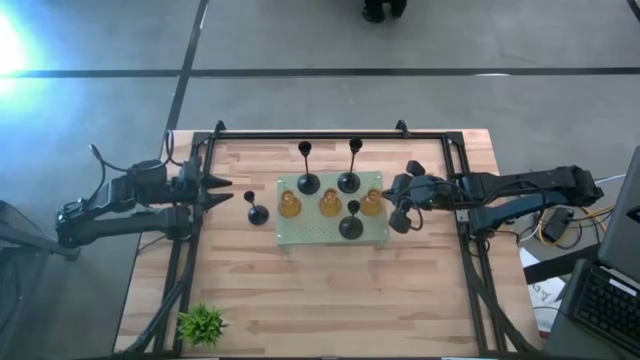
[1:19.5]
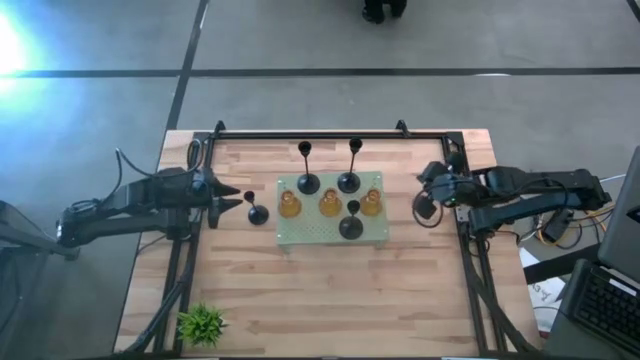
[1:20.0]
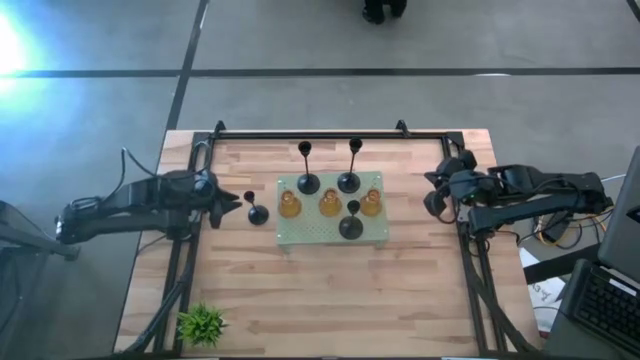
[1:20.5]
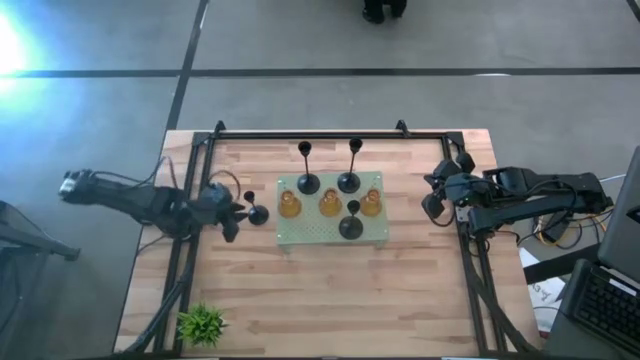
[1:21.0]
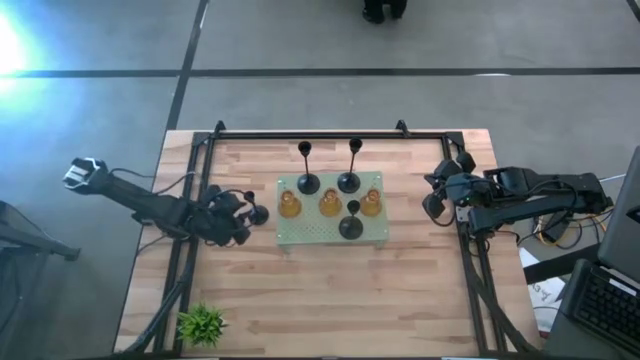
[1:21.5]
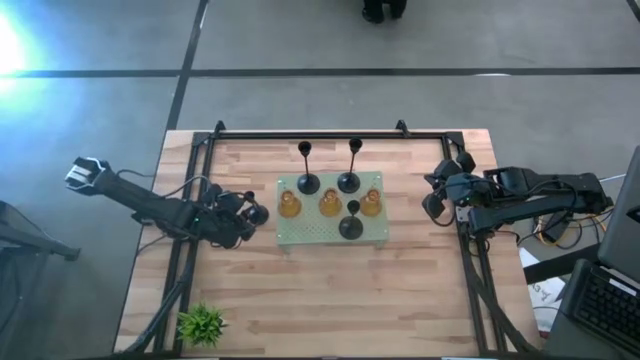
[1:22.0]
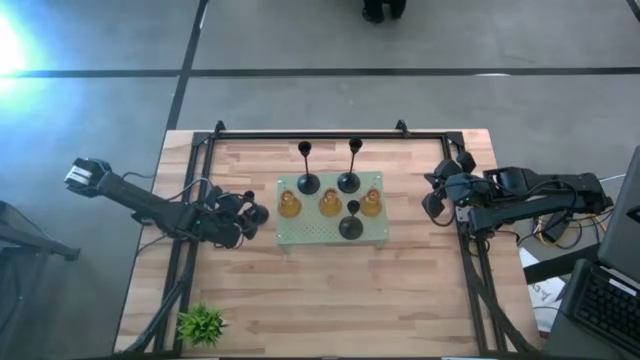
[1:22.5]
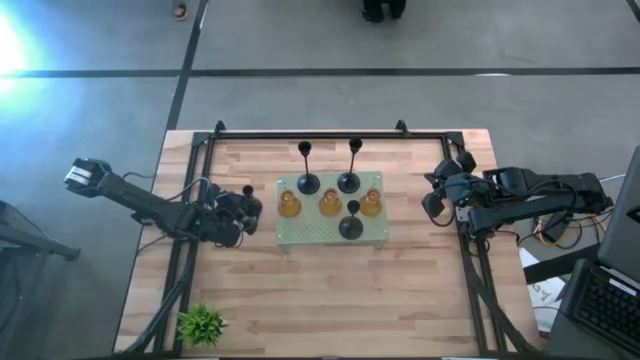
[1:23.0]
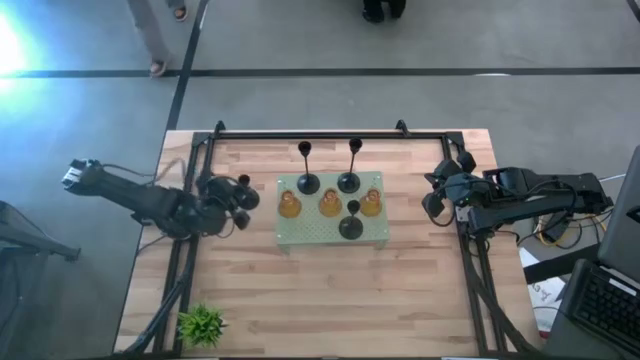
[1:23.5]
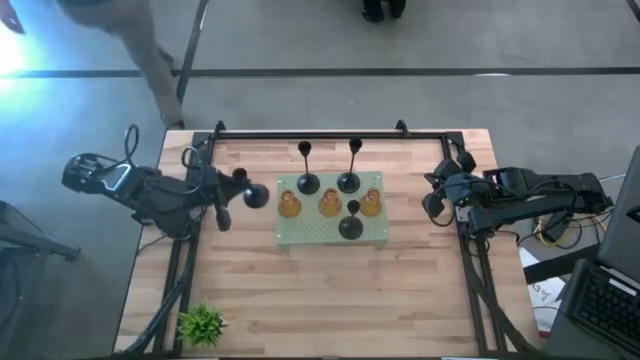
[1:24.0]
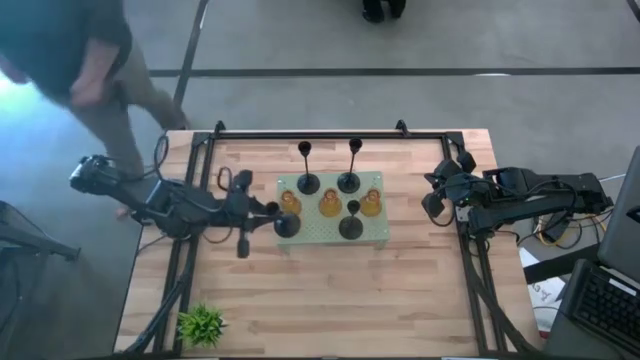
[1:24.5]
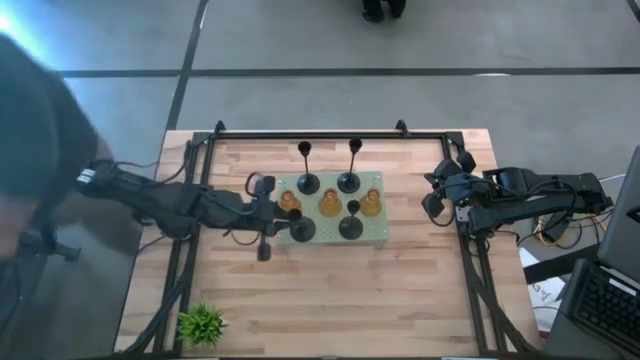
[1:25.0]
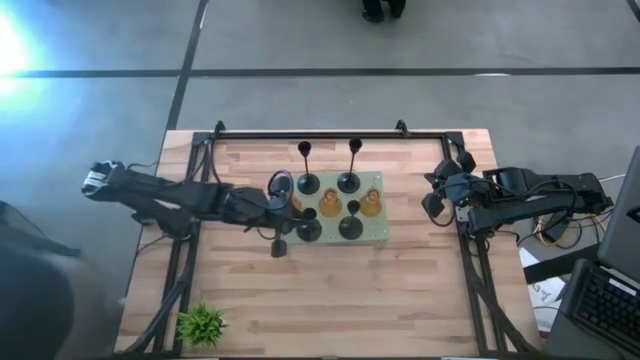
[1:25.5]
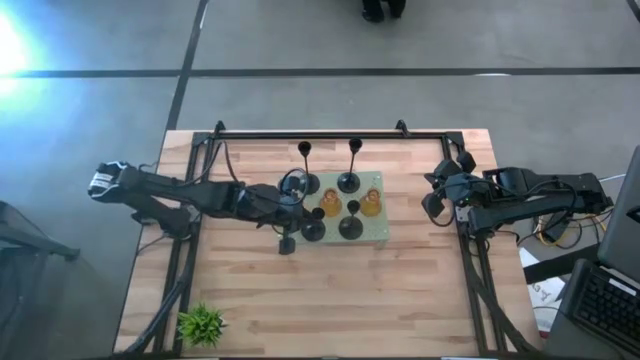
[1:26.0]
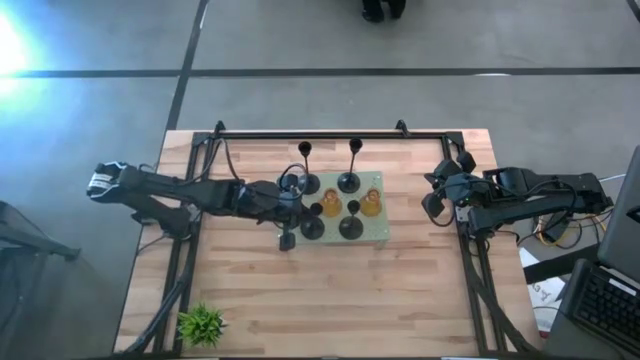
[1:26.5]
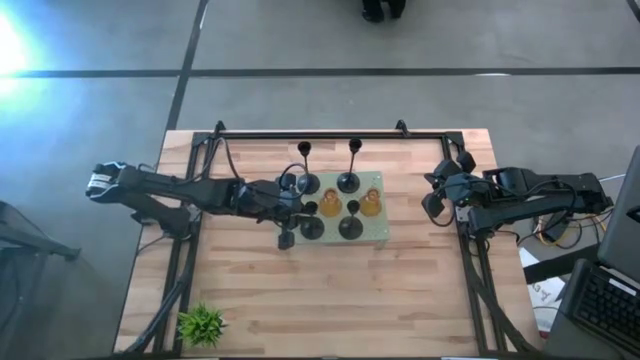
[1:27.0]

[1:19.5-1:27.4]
Task: Pick & Place candle stick holders
Put the black candle holder on the shelf

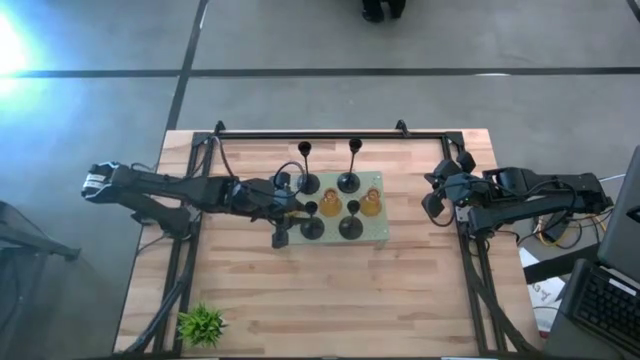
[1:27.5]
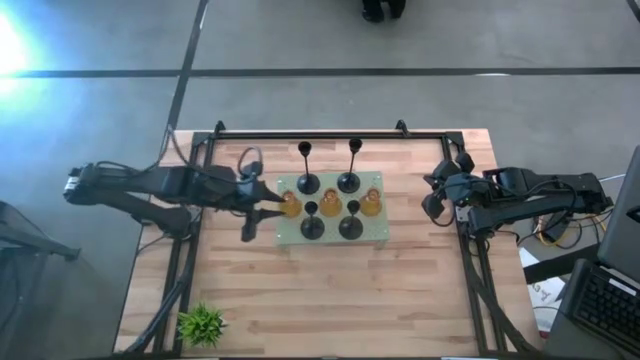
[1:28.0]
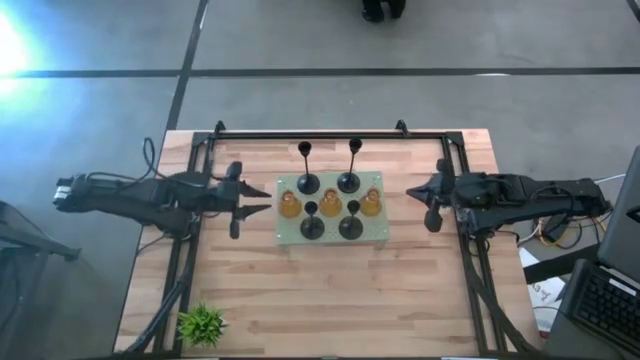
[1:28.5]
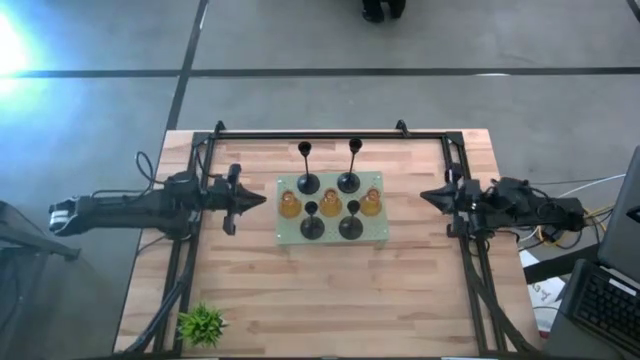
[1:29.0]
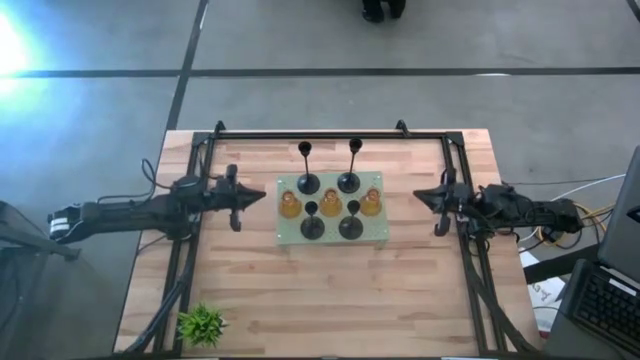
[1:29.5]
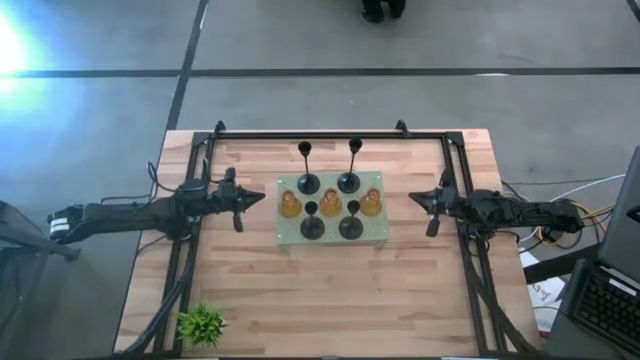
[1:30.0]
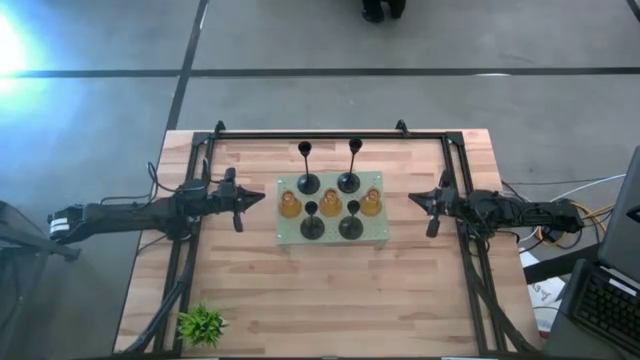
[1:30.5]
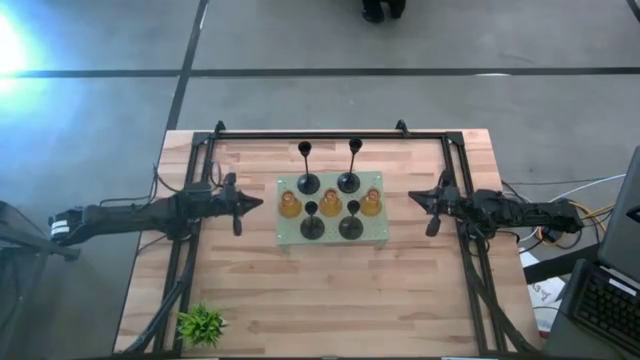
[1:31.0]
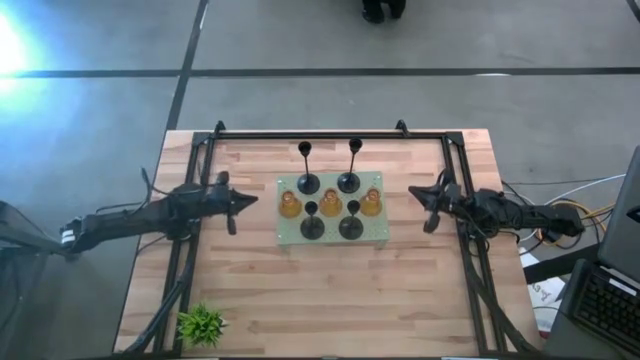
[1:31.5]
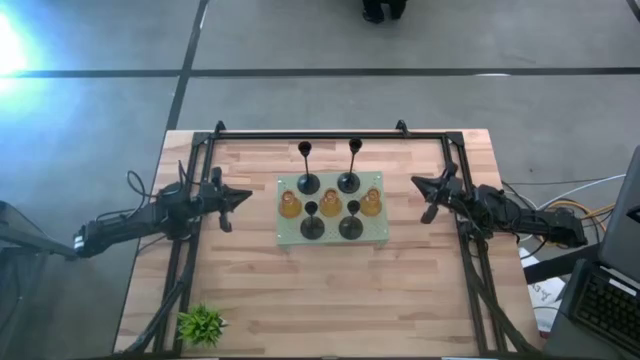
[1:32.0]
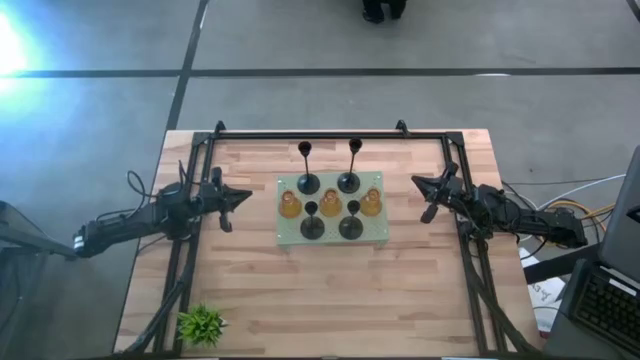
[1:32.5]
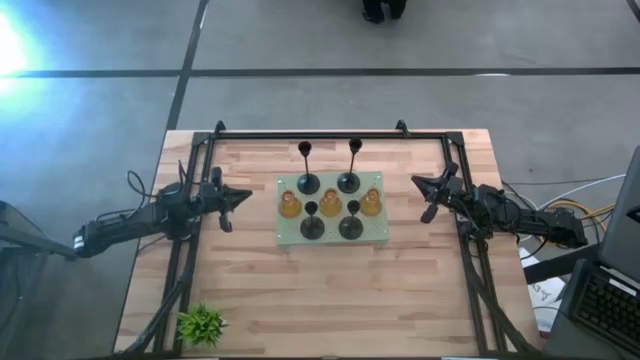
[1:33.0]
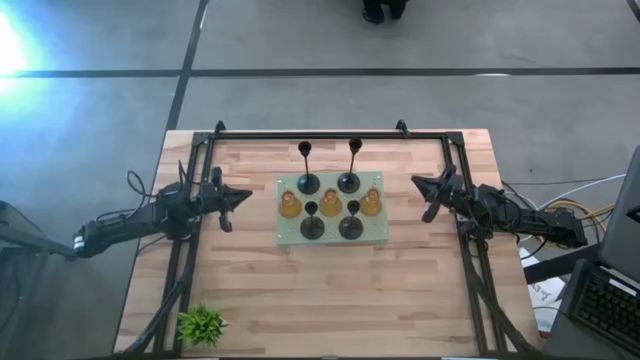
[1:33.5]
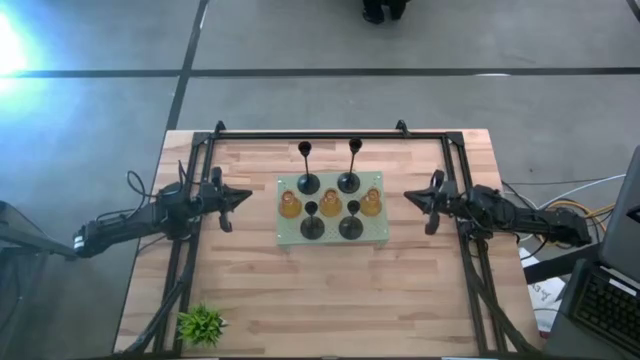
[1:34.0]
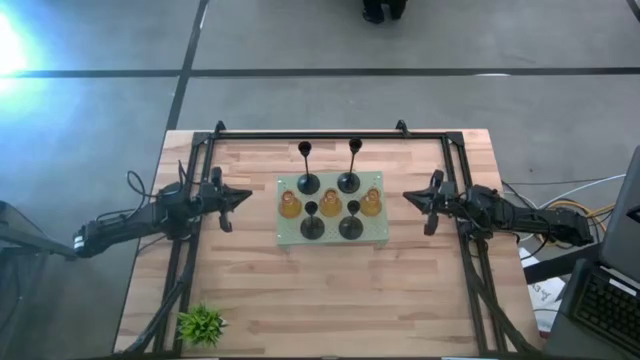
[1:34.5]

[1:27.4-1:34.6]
Return to Home Position

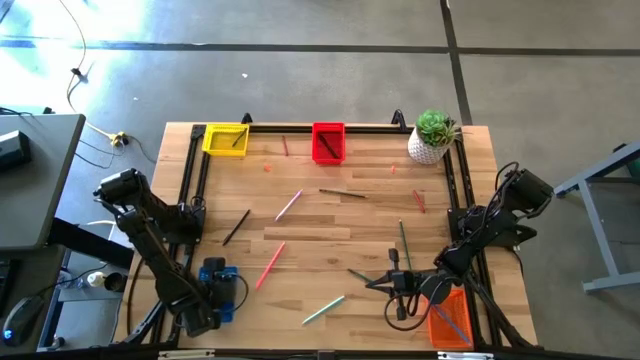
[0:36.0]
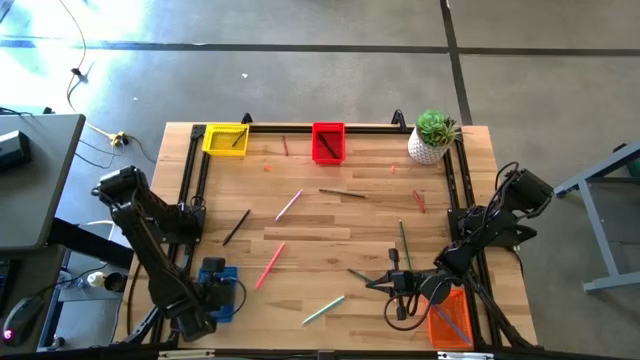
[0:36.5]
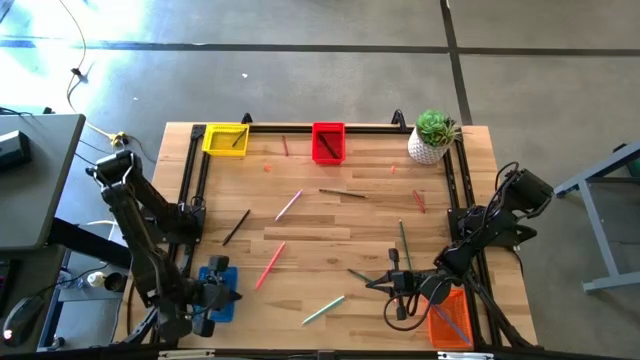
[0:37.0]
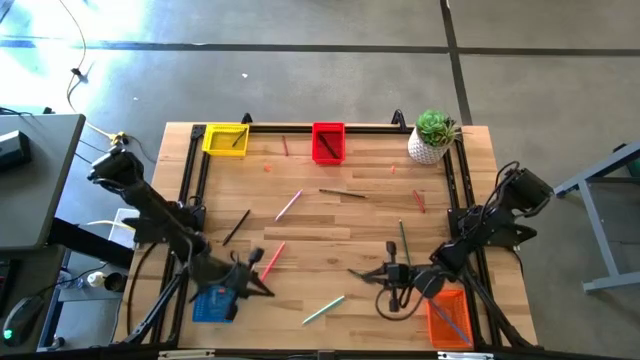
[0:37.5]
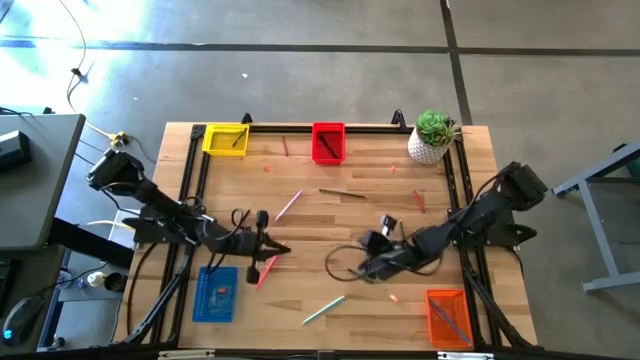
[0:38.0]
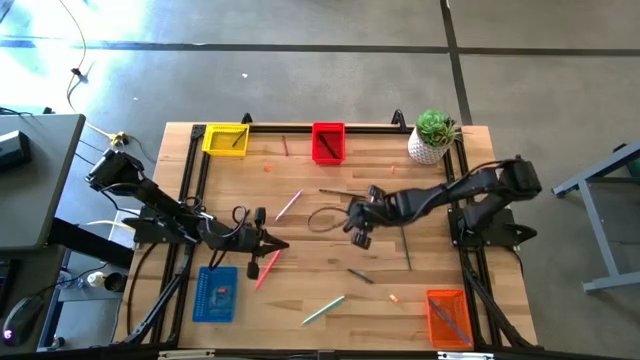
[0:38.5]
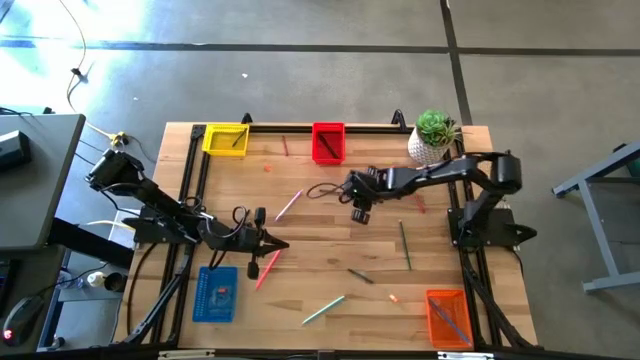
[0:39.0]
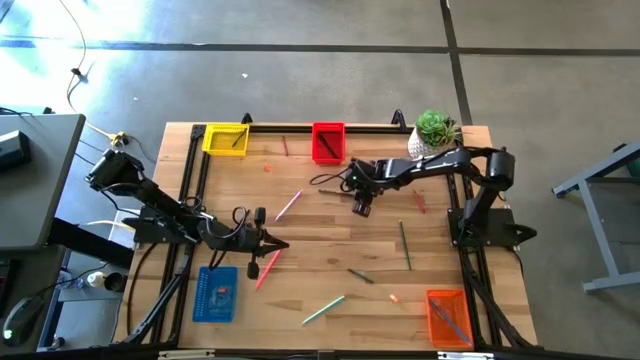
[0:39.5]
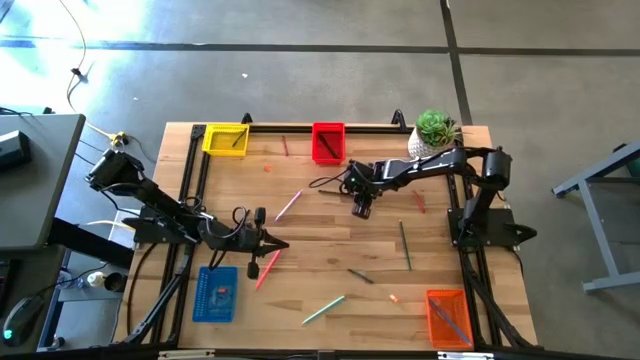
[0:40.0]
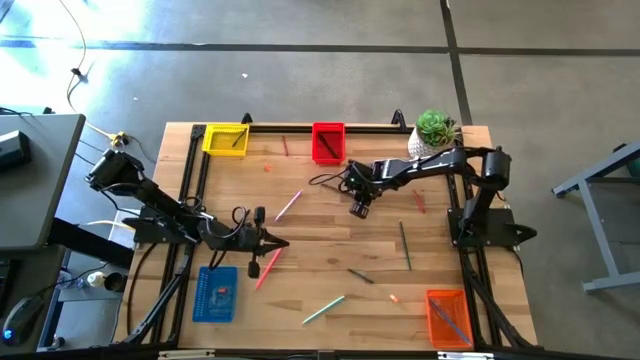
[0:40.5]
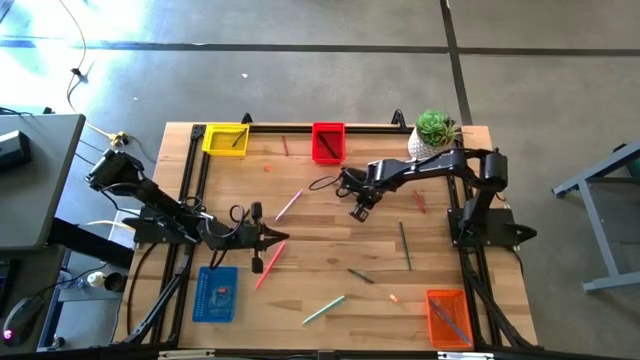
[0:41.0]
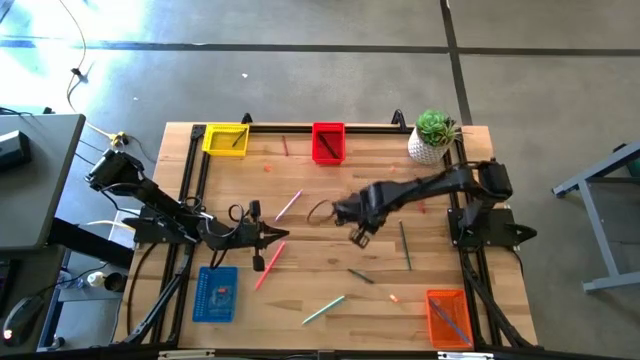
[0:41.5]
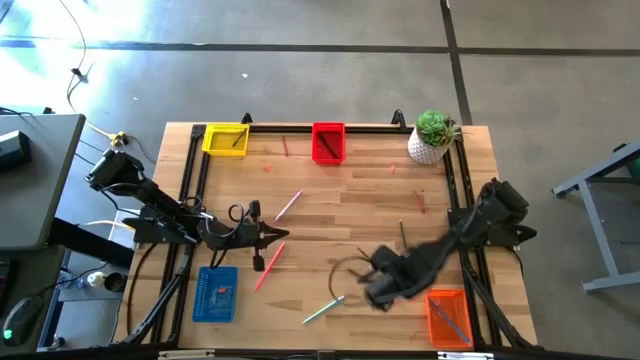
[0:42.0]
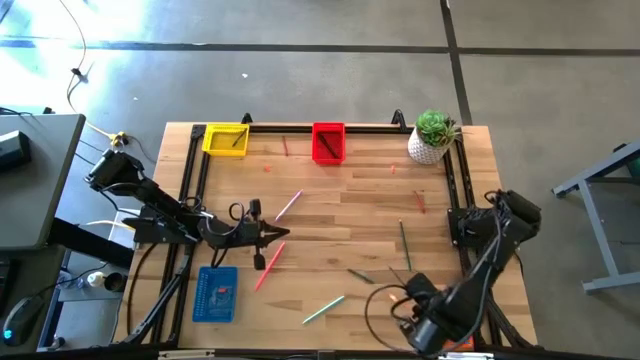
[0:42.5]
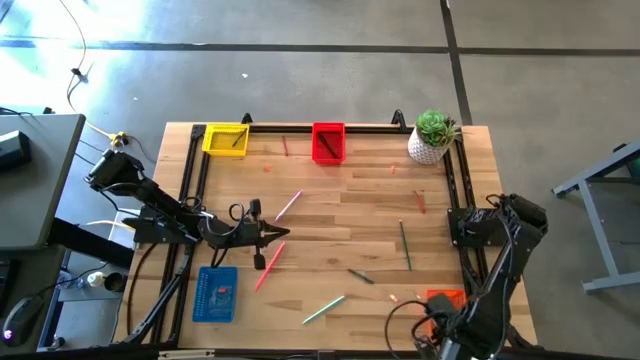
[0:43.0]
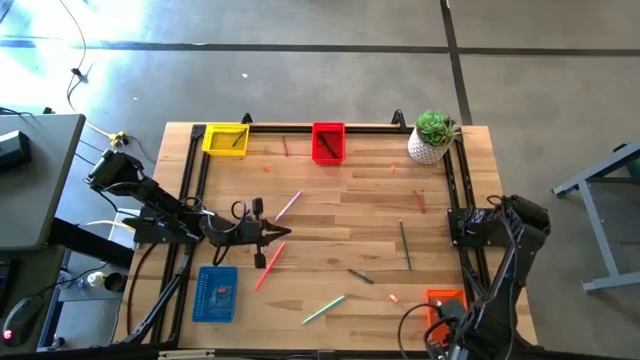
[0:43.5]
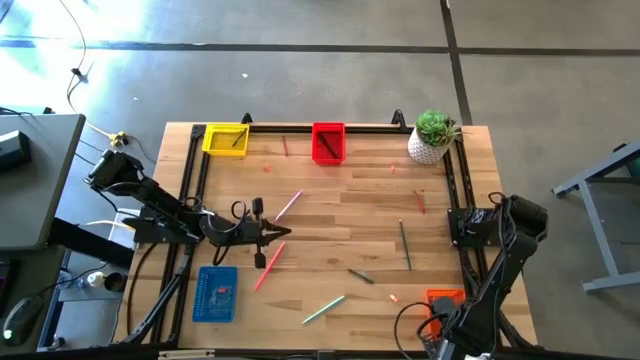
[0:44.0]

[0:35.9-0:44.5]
Task: Sort crayons/erasers/pens/pencils in bins
Put the purple pencil into the orange bin
